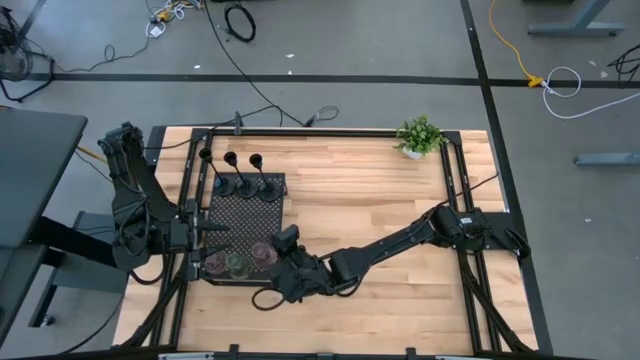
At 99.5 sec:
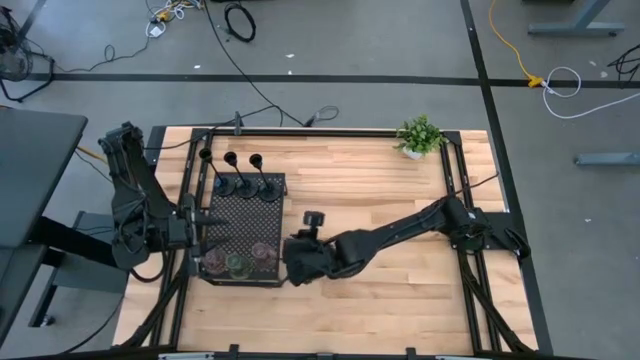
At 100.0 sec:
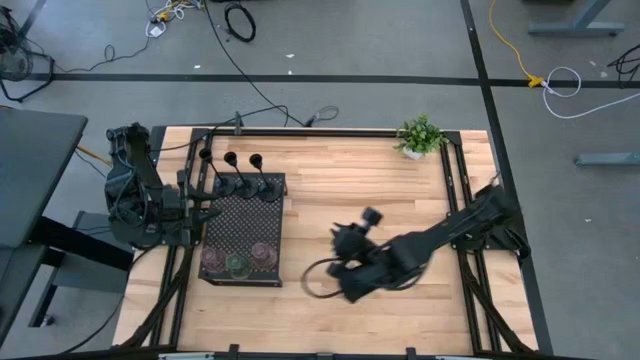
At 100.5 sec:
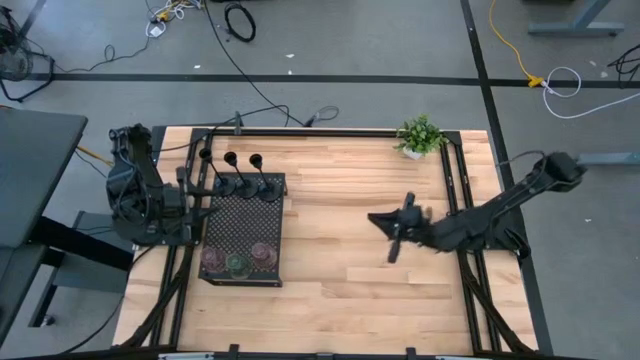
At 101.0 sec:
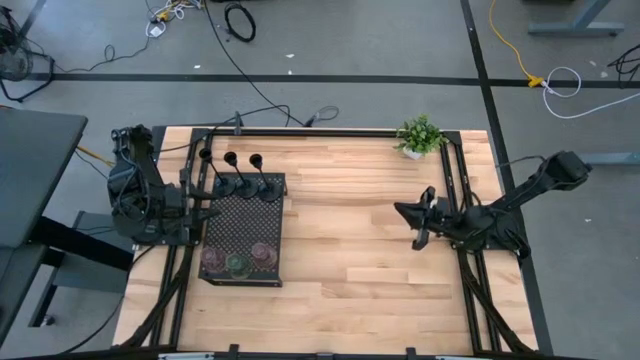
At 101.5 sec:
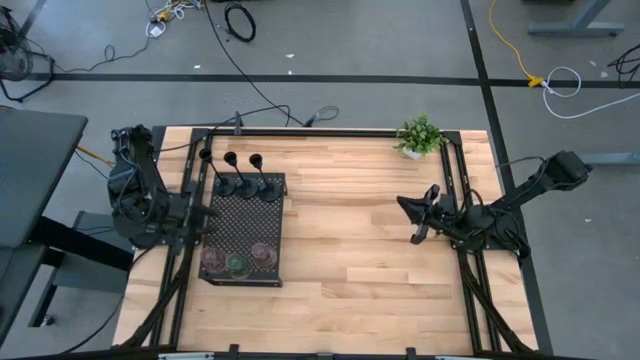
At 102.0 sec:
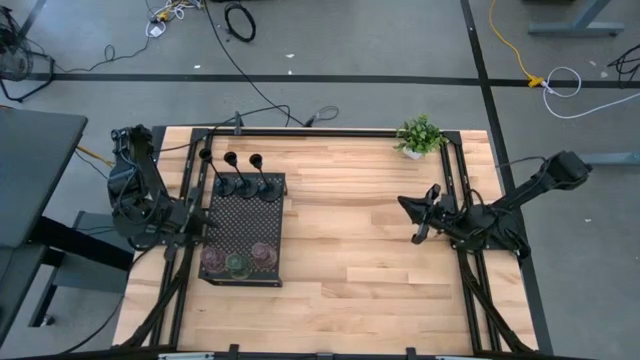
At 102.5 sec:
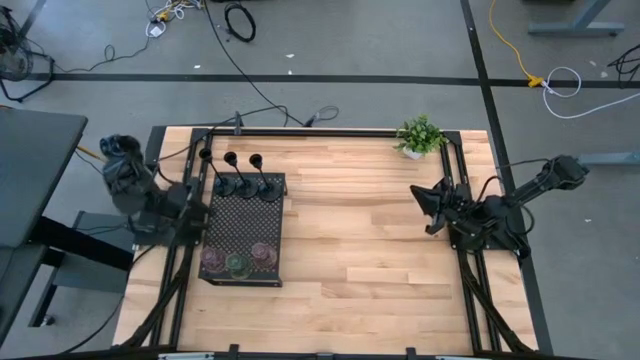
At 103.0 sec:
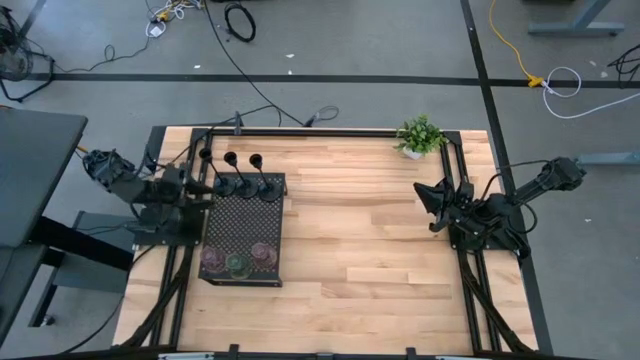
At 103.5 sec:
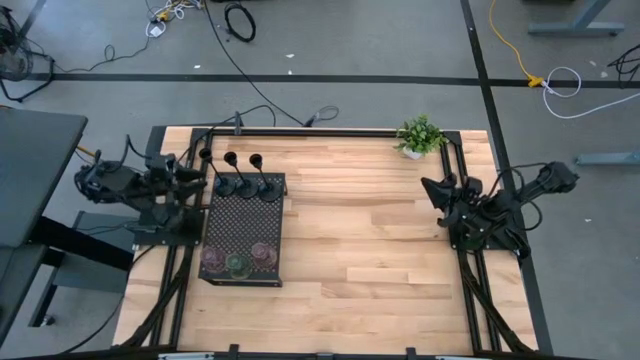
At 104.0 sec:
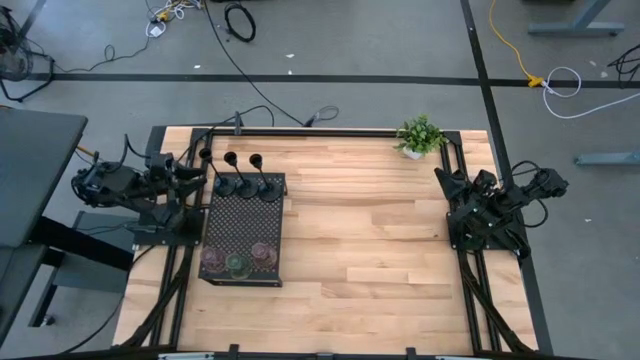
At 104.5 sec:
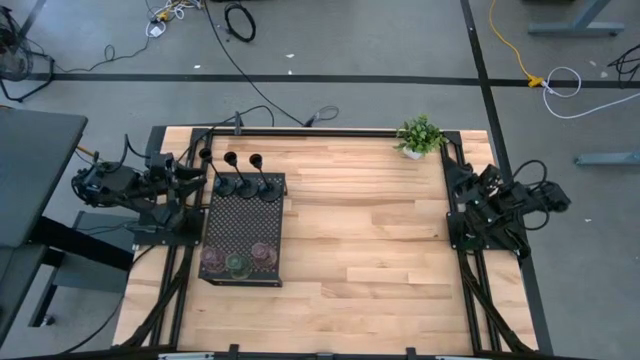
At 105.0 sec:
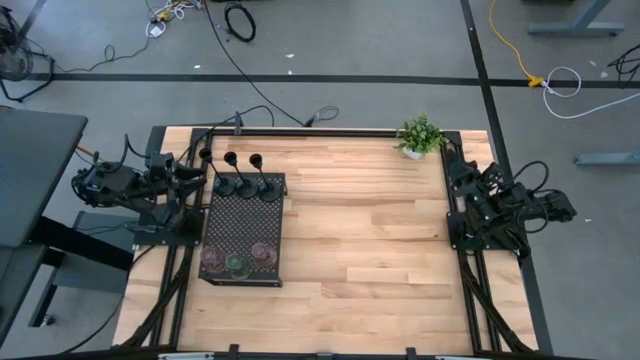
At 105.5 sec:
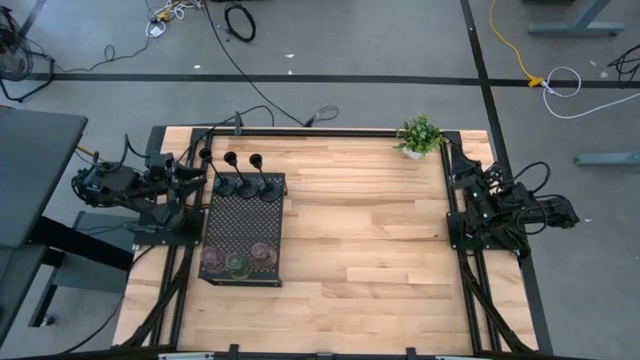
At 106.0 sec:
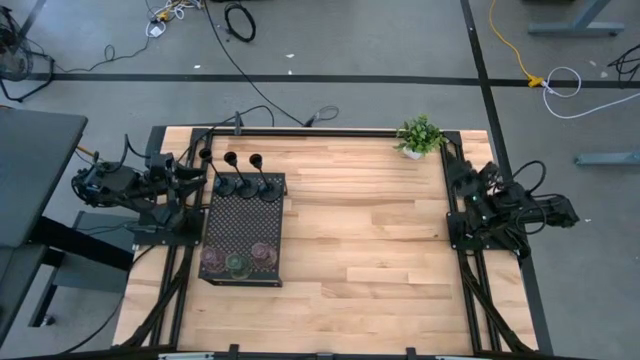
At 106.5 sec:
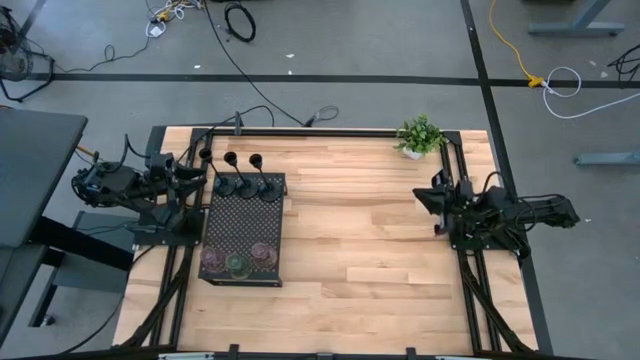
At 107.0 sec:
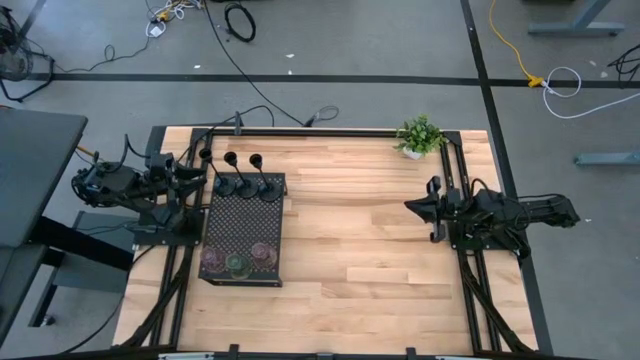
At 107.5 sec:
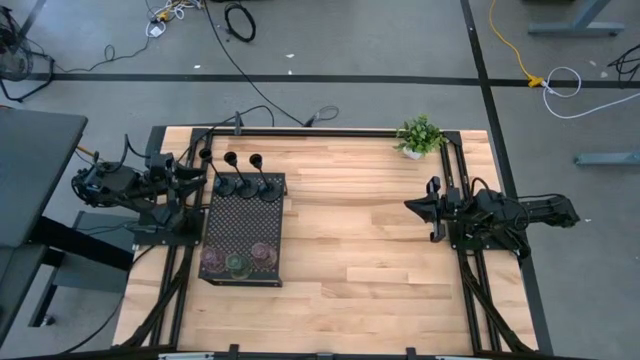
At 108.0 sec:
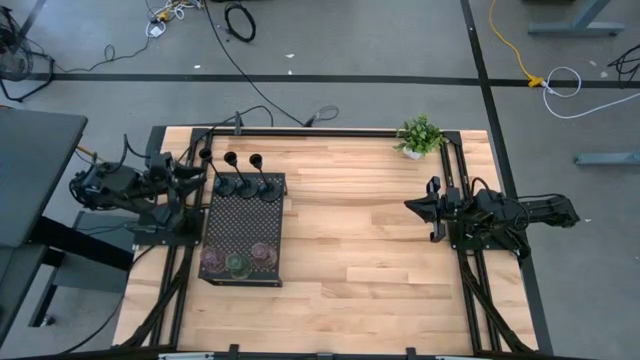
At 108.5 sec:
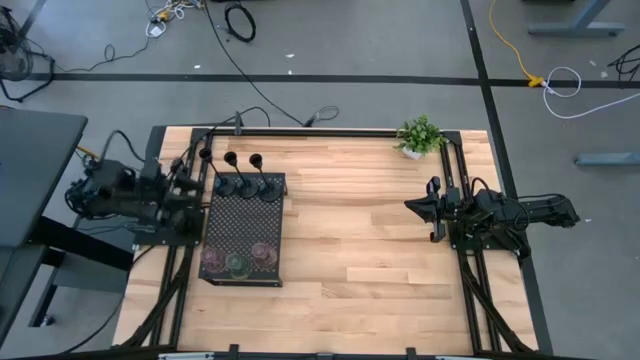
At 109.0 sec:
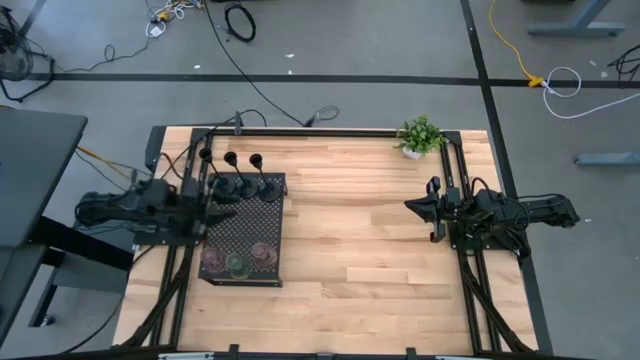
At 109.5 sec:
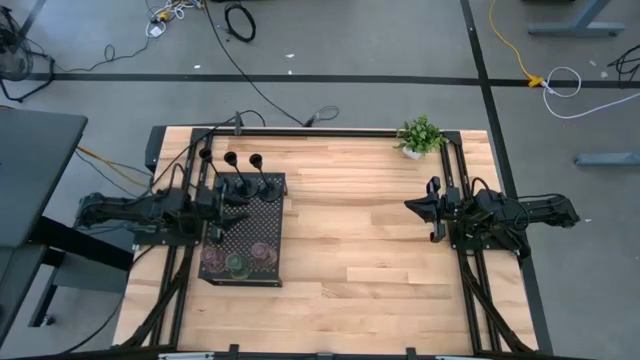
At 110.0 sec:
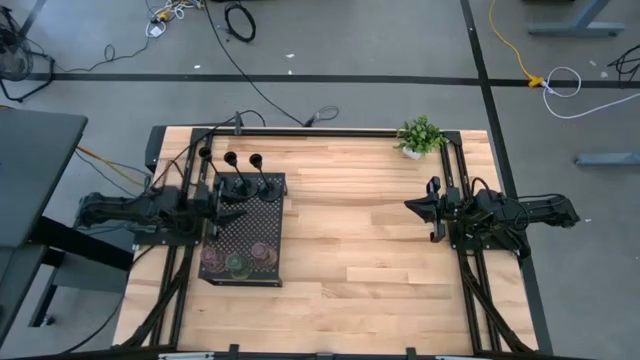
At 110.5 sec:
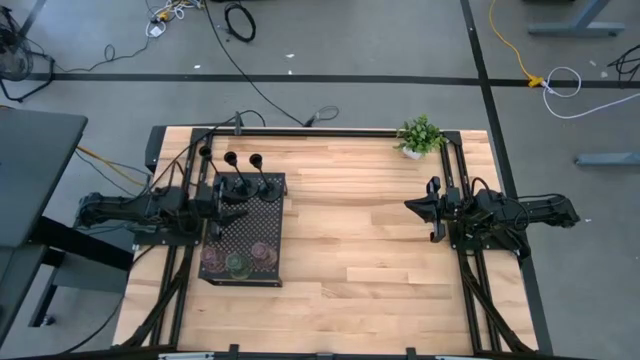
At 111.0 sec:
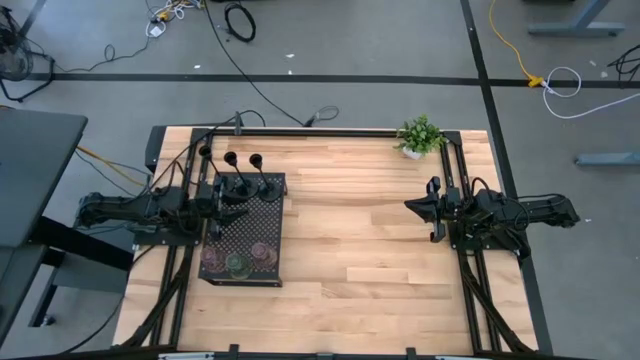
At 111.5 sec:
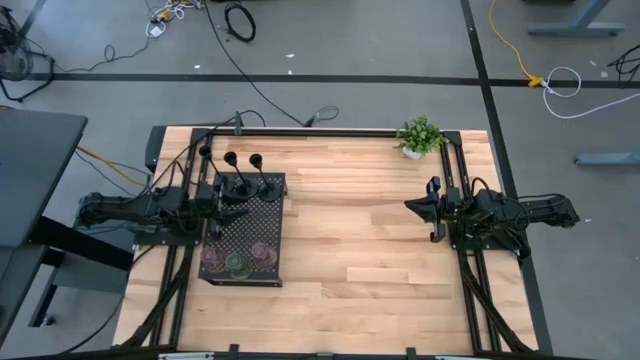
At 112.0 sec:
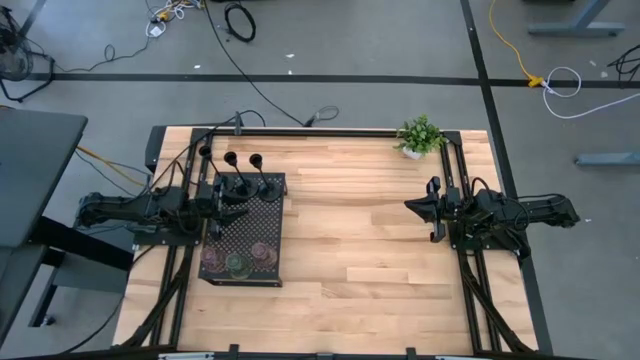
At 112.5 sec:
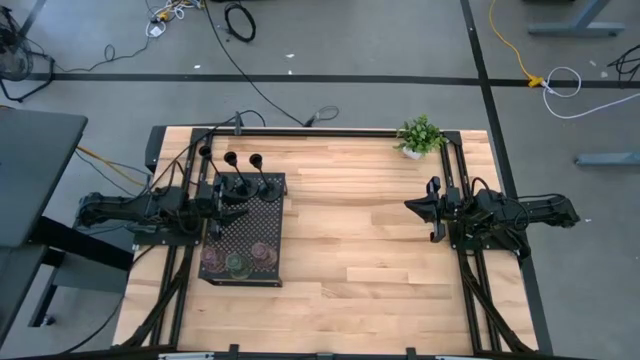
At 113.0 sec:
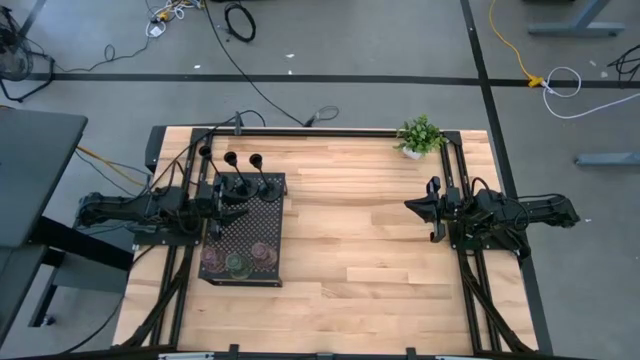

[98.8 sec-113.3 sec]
Task: Pick & Place candle stick holders
Return to Home Position

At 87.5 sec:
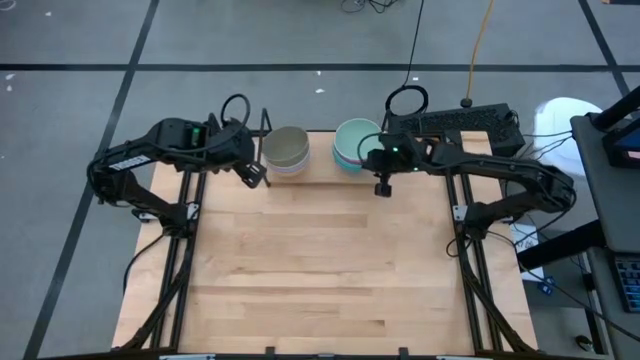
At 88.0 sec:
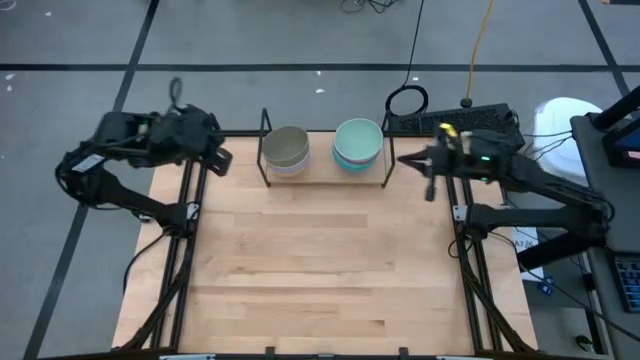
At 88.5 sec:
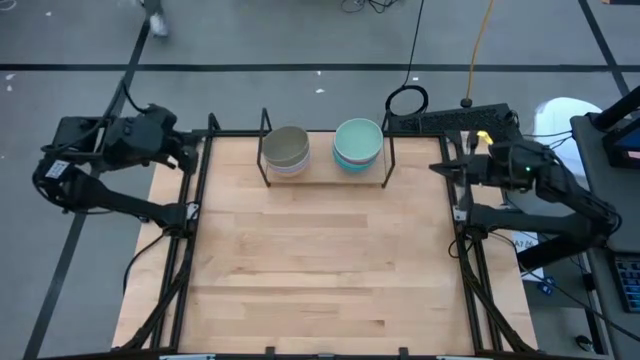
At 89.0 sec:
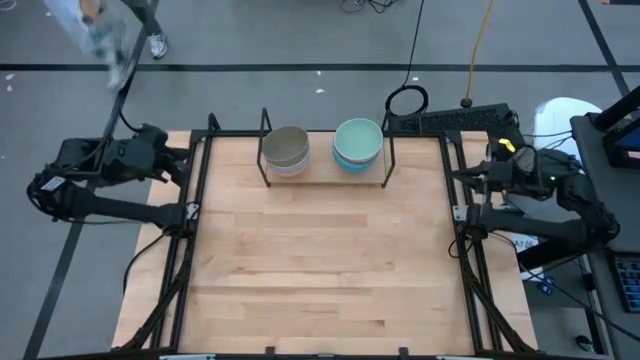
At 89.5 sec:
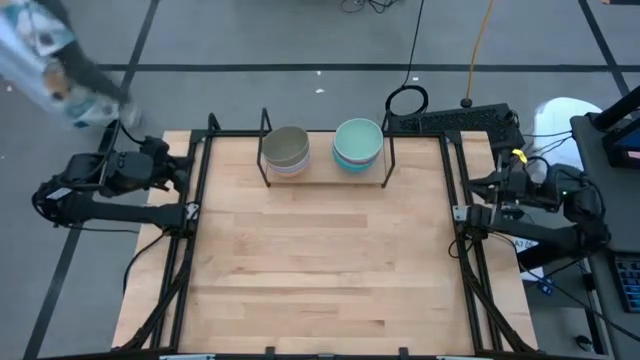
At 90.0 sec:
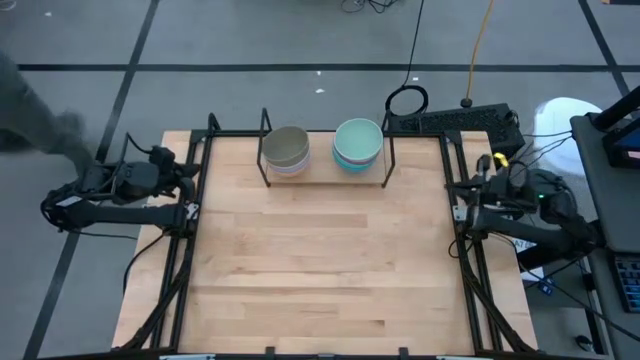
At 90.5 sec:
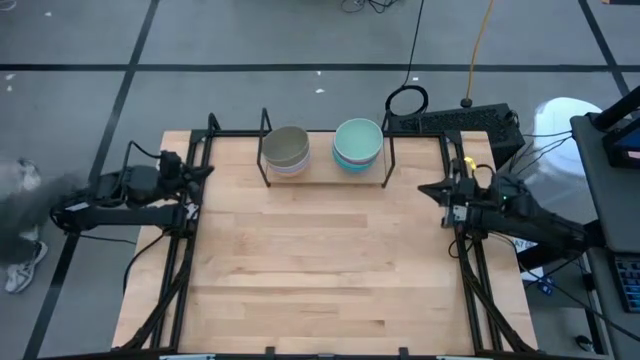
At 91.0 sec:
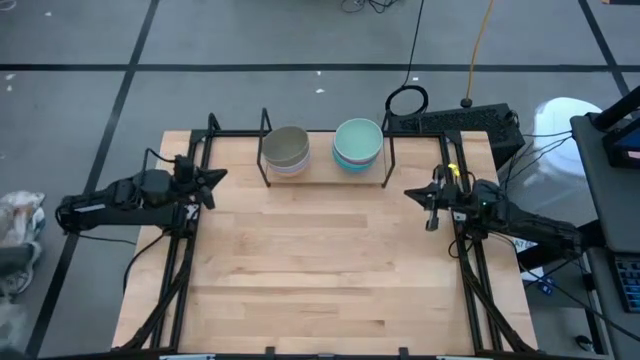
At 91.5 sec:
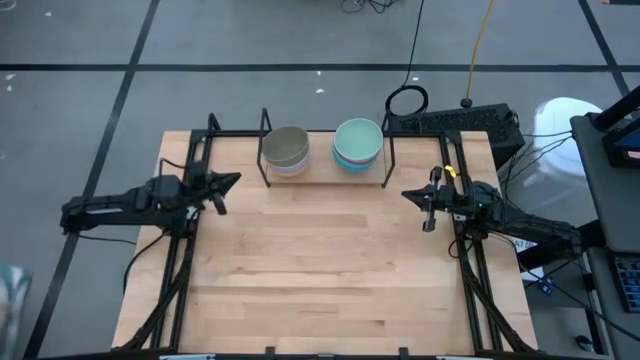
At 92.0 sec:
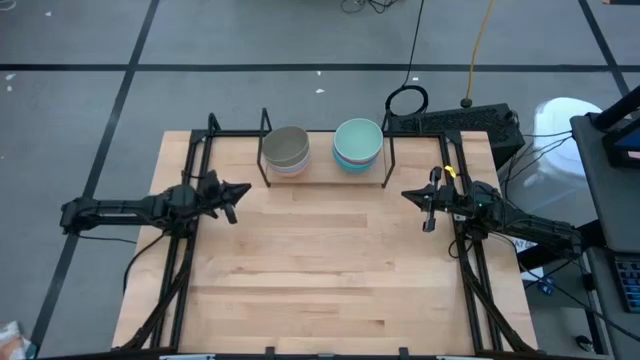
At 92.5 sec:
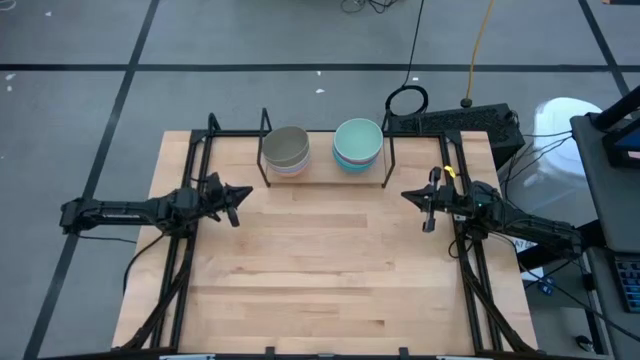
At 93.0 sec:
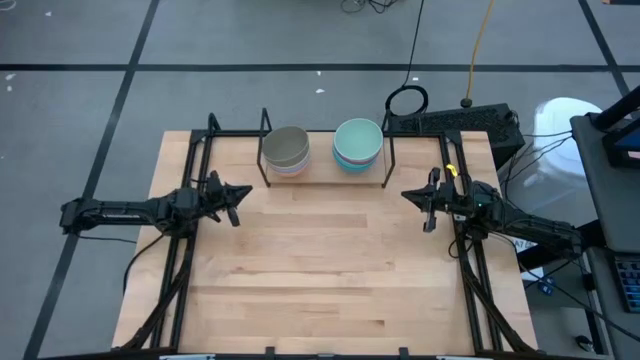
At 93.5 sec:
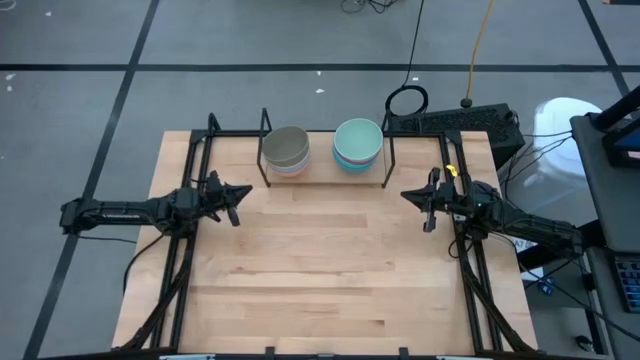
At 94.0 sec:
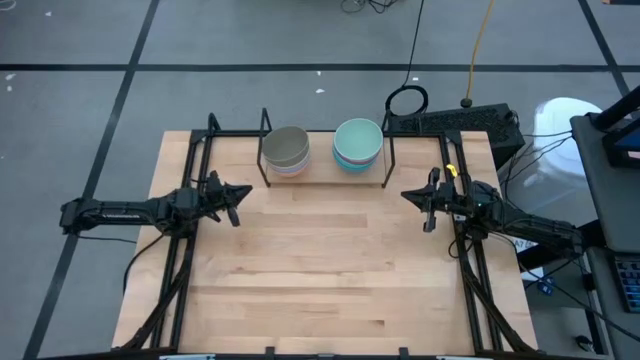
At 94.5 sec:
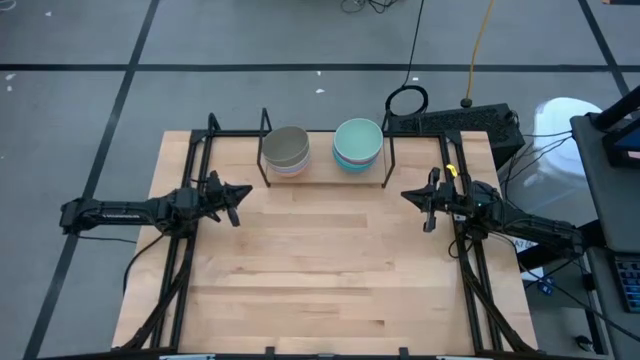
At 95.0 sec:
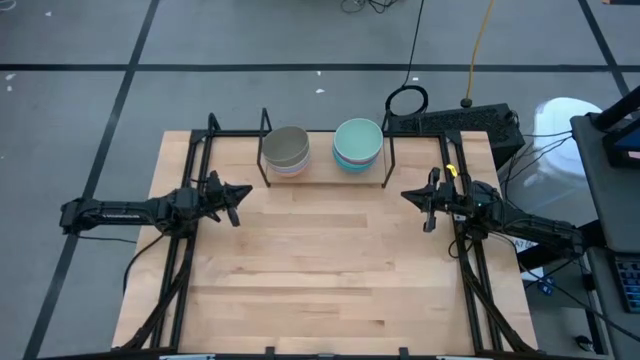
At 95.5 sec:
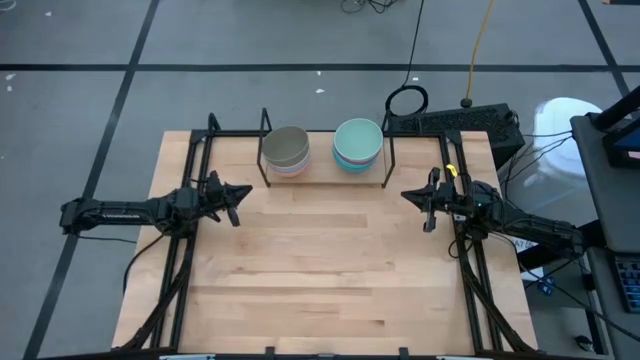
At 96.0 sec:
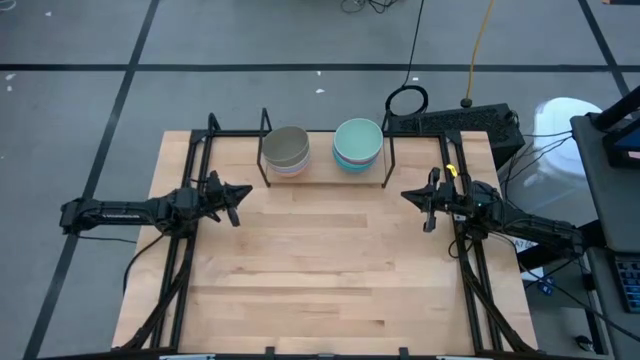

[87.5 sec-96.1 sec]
Task: Place and stack bowls onto a shelf
Return to Home Position
